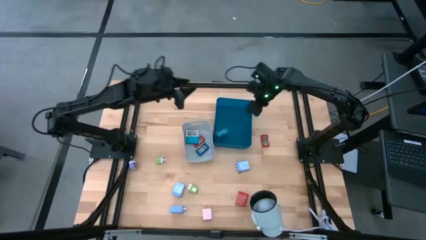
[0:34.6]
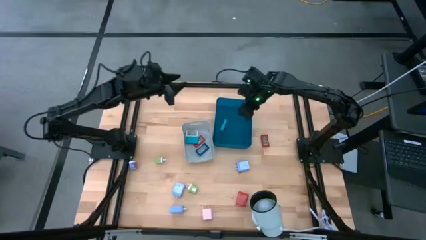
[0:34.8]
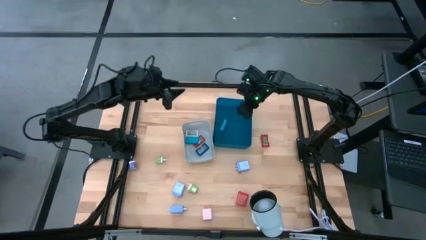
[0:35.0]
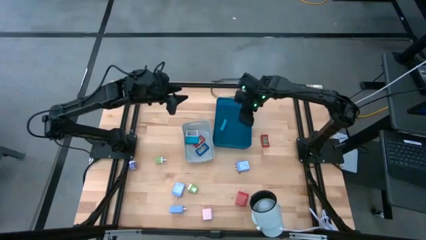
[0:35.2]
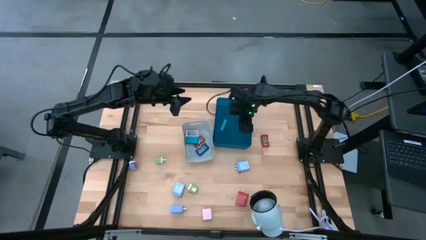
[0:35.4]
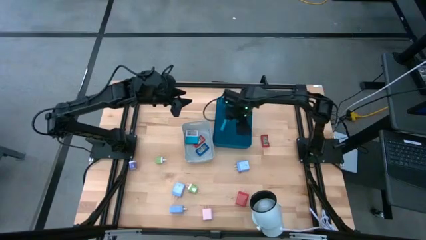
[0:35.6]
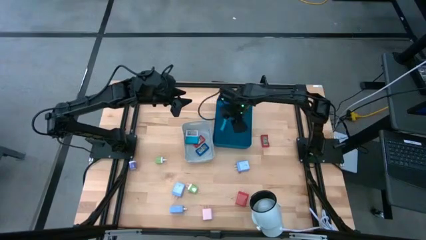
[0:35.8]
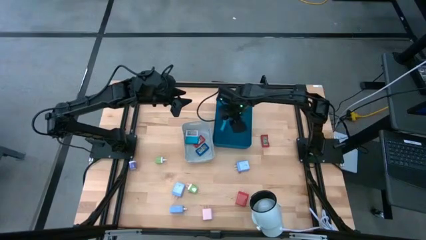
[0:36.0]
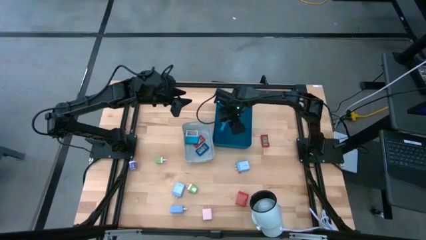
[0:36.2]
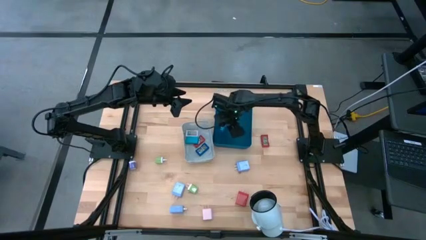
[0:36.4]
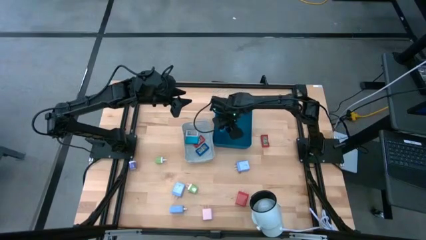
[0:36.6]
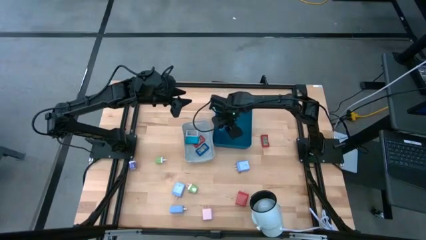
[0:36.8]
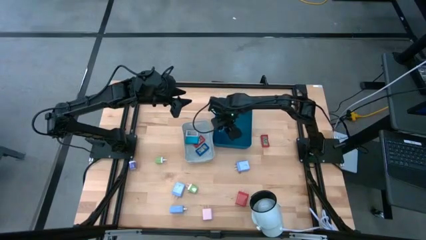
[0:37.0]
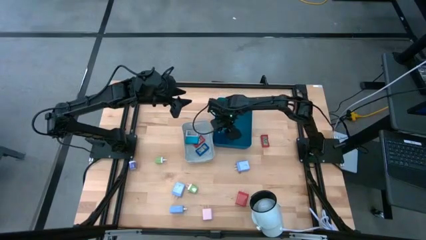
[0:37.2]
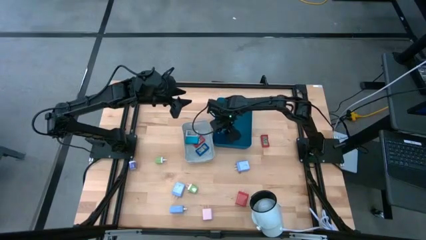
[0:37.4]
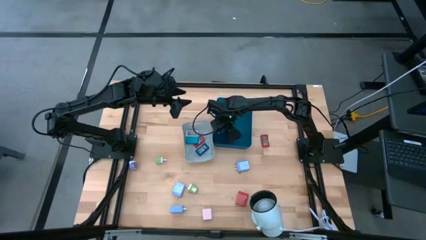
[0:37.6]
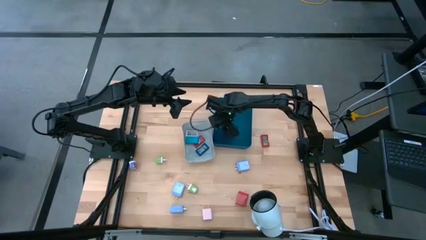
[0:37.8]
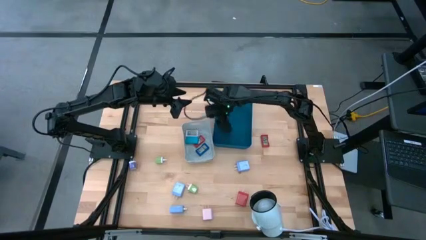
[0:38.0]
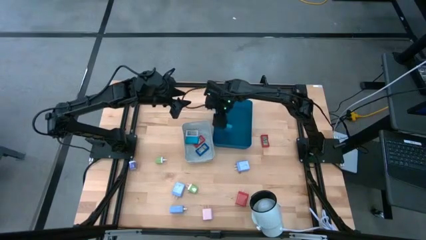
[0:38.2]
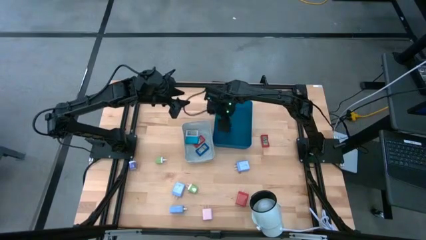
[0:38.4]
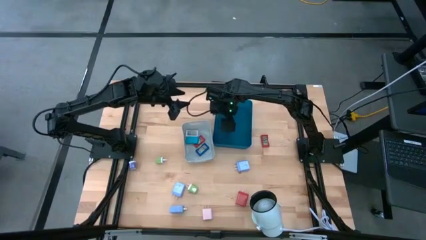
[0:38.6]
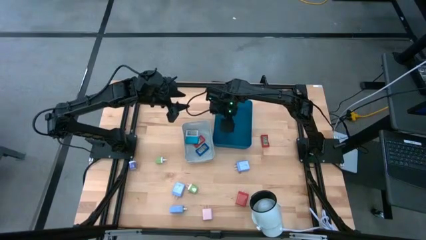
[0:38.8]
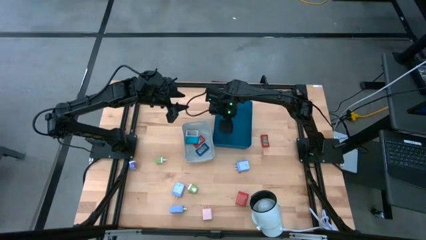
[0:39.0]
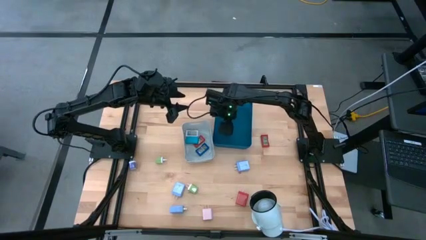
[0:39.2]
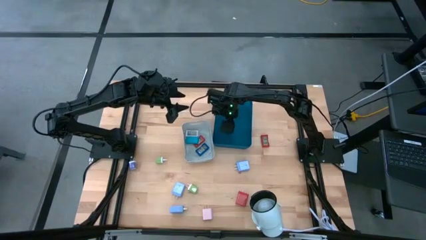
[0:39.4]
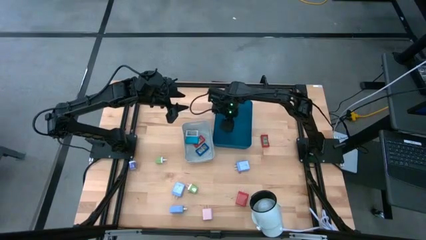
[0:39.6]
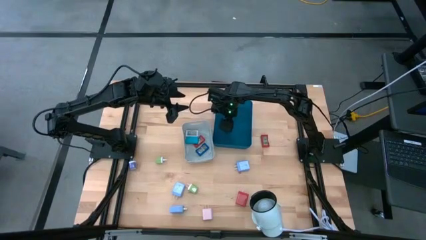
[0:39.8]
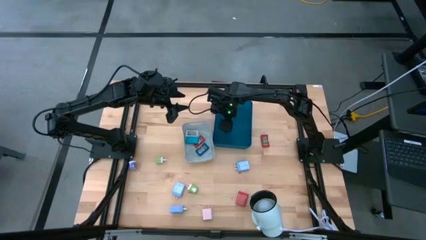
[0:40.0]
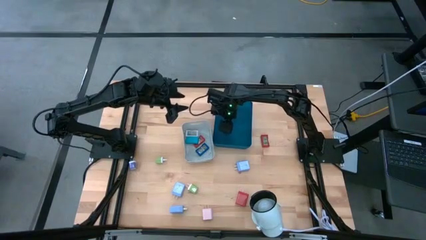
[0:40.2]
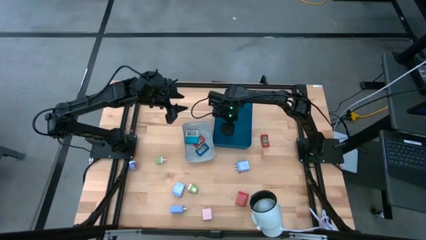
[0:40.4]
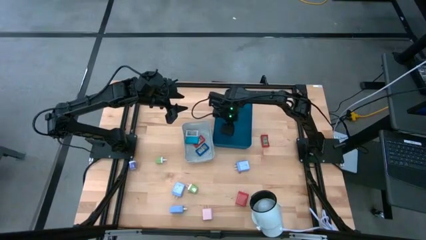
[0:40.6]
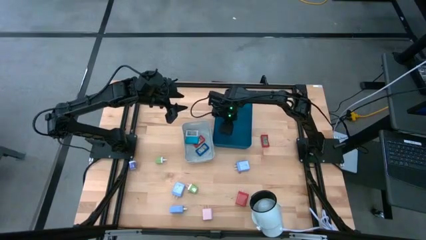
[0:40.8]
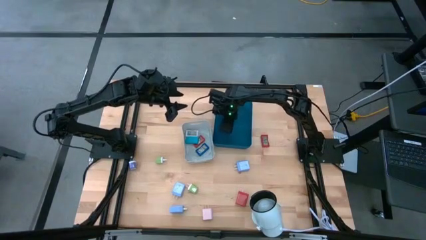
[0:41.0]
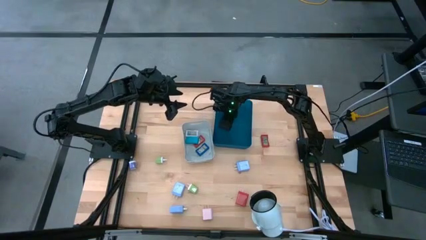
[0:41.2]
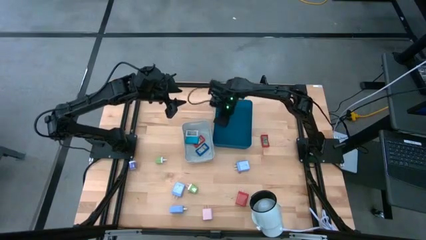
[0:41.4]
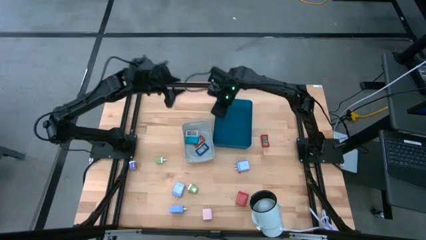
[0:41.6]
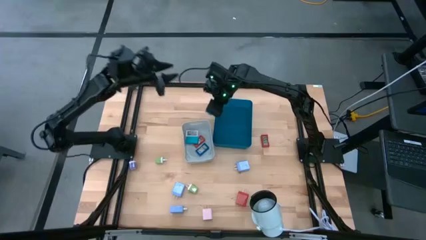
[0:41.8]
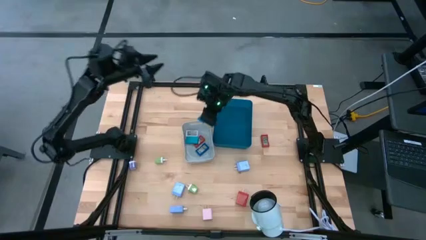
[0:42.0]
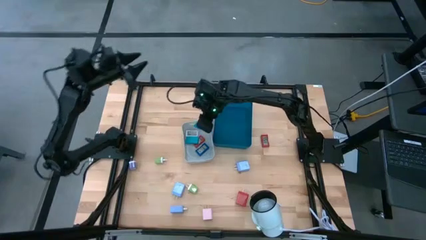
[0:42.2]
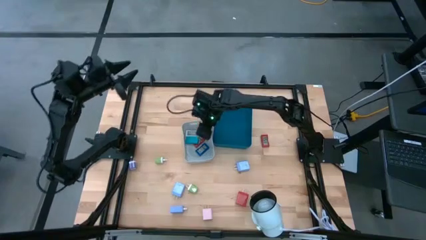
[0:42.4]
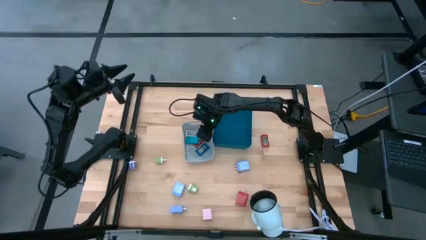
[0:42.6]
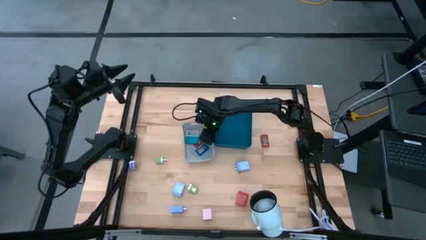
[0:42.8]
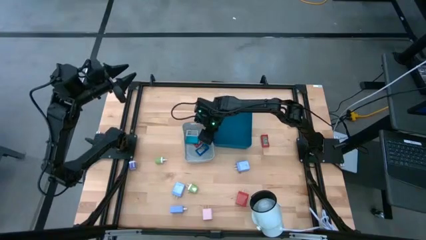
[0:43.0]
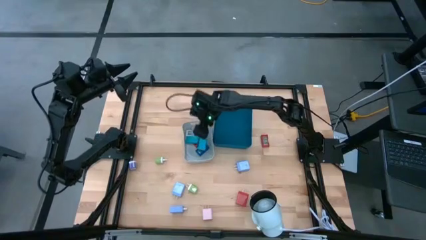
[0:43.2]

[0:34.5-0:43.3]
Task: Pick & Place Office items
Put the light blue timer into the gray bin

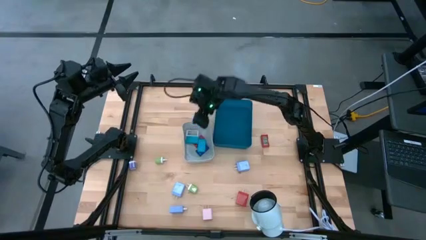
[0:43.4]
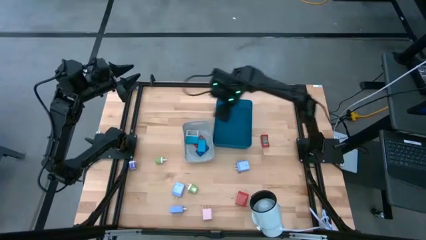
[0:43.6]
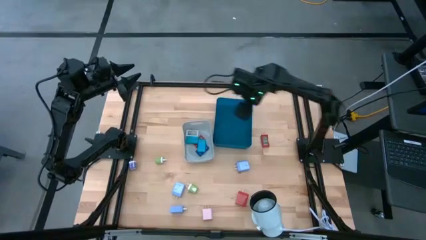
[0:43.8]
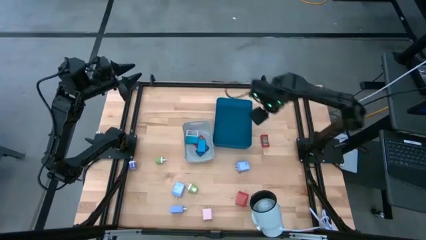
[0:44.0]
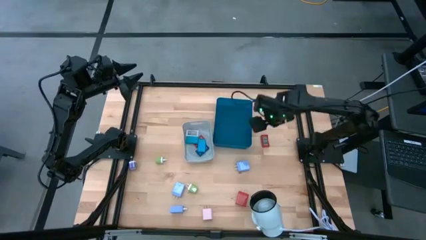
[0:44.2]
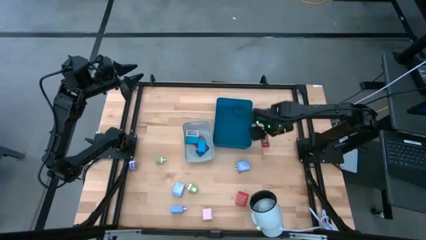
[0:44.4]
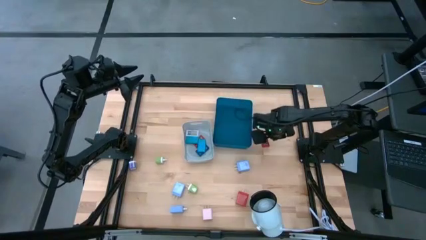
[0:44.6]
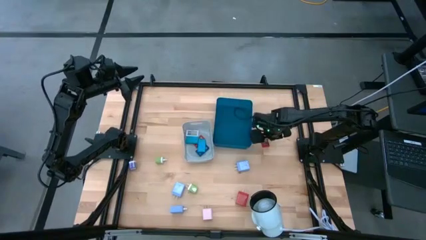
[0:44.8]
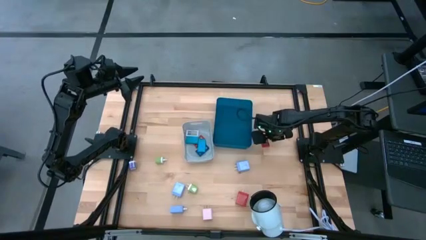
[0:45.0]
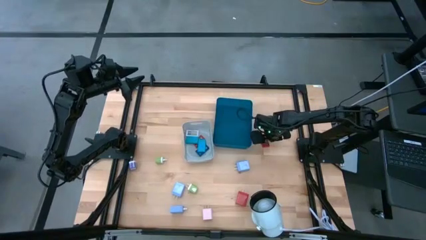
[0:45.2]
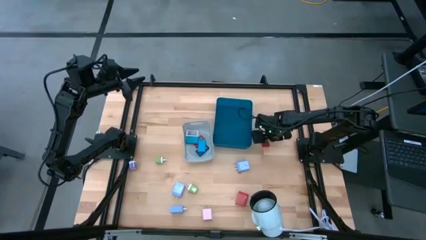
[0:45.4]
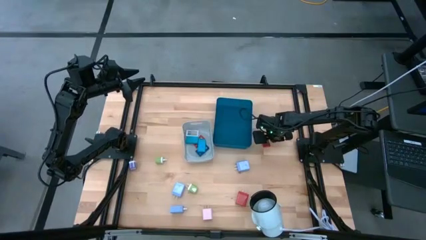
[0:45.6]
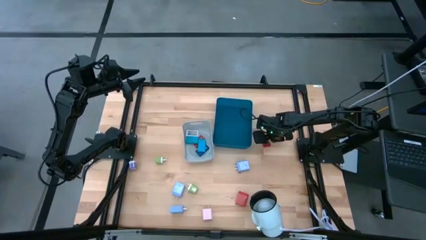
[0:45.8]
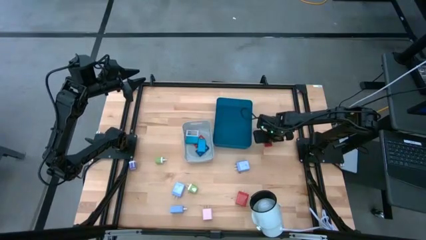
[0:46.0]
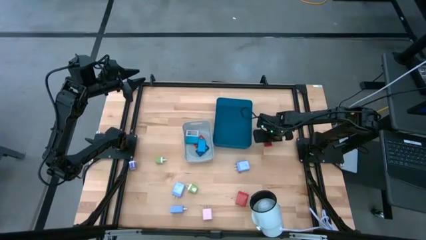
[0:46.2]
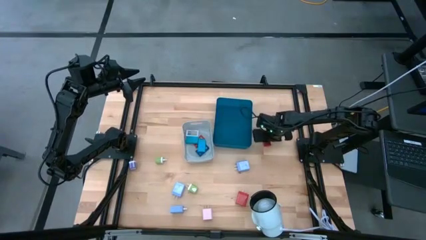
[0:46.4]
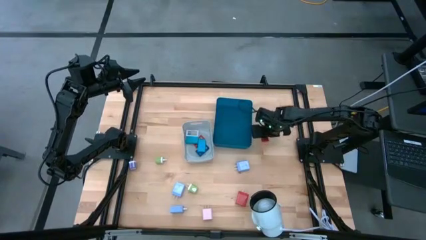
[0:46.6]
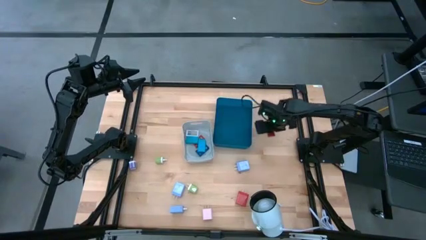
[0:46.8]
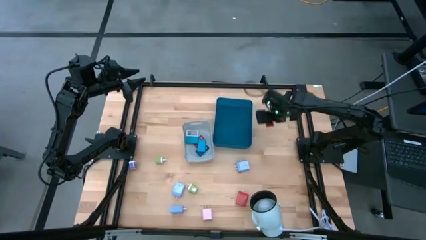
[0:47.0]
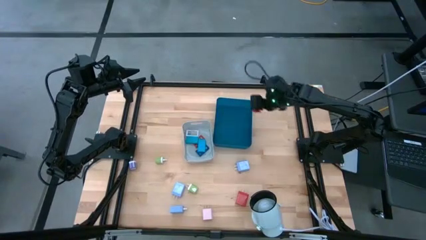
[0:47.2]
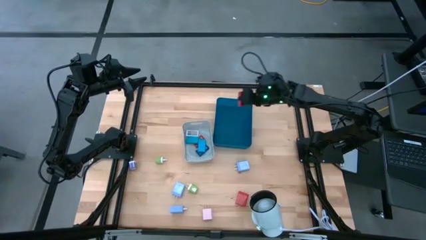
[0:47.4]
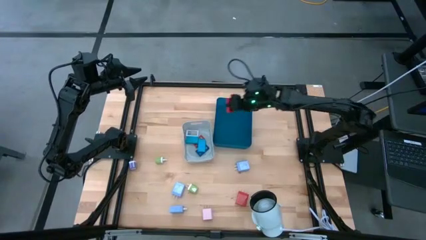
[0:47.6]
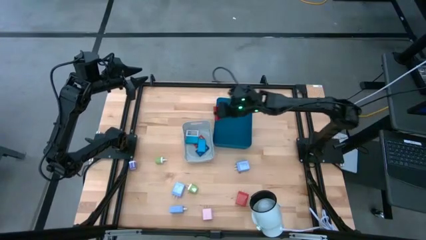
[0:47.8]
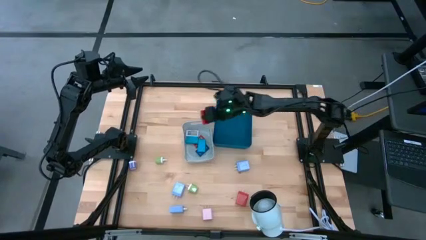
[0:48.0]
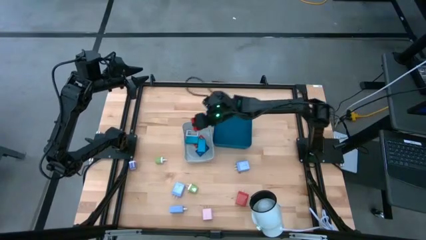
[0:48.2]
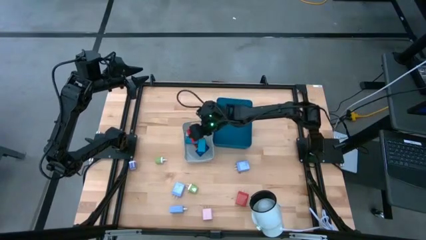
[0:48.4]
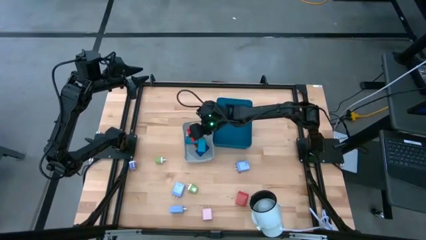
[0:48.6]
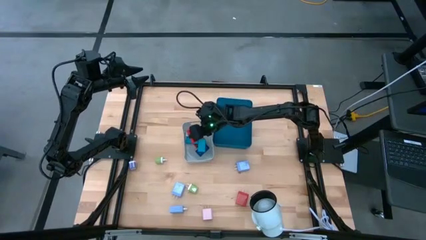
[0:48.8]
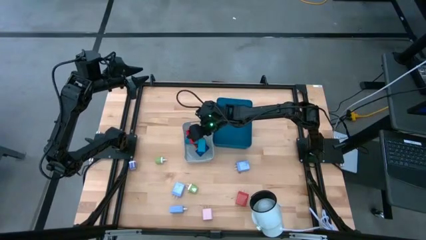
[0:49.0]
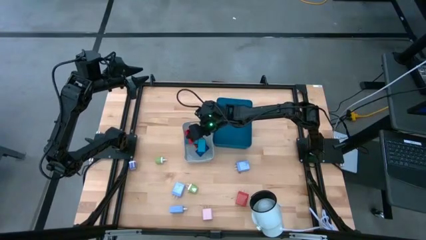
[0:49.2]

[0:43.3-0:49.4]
Put the red timer into the gray bin

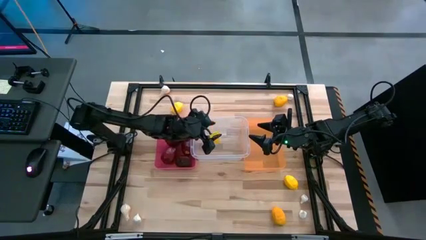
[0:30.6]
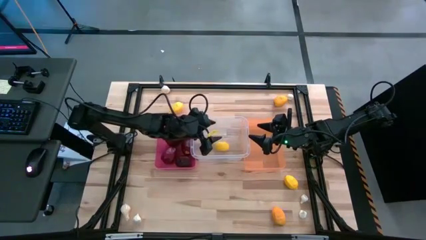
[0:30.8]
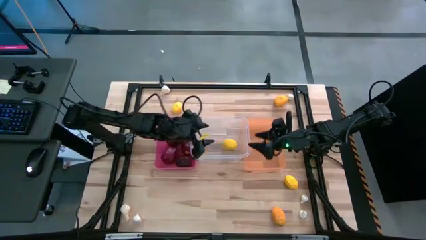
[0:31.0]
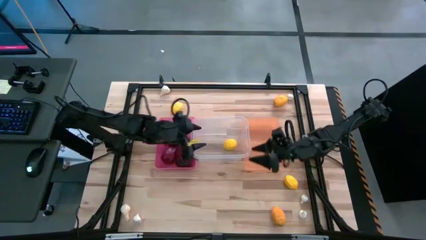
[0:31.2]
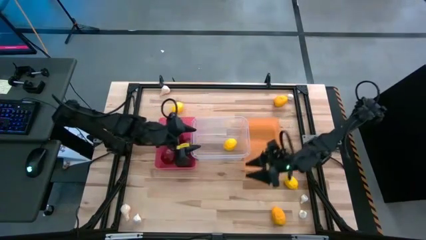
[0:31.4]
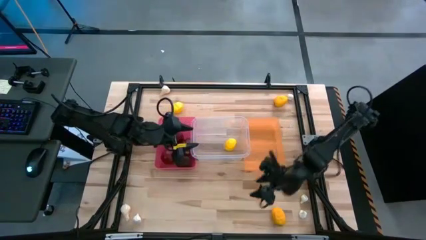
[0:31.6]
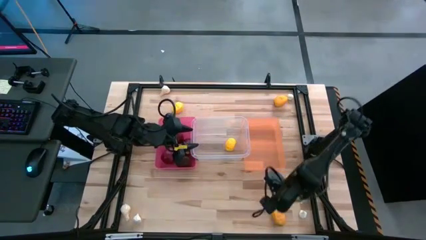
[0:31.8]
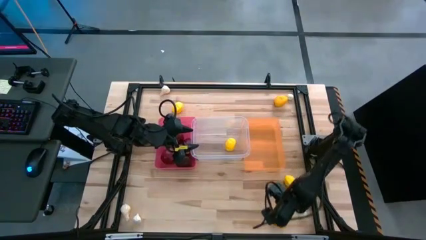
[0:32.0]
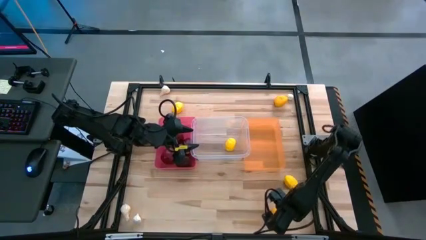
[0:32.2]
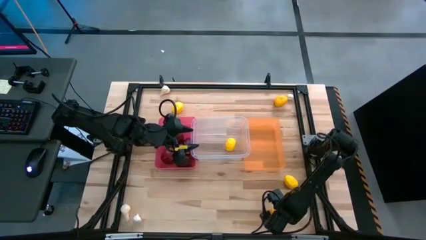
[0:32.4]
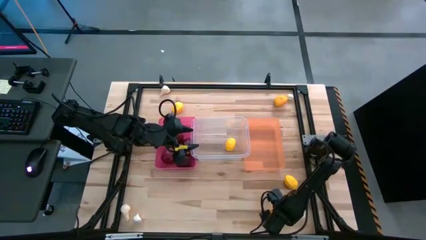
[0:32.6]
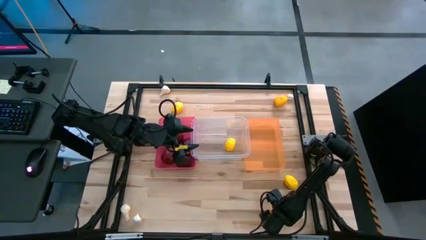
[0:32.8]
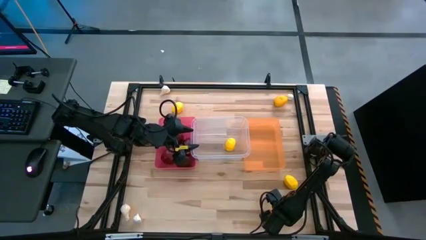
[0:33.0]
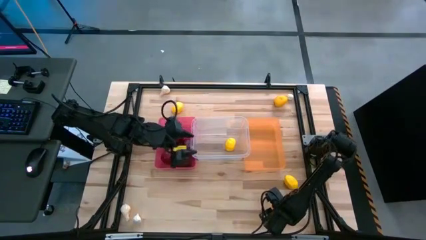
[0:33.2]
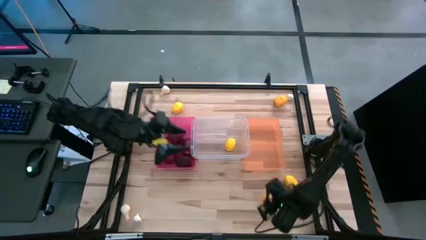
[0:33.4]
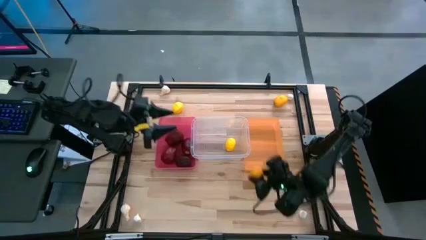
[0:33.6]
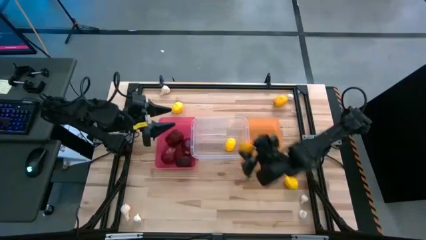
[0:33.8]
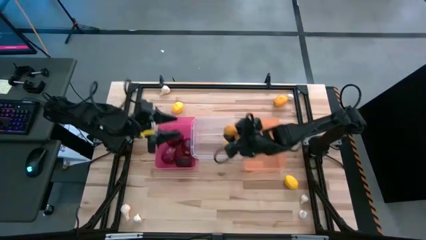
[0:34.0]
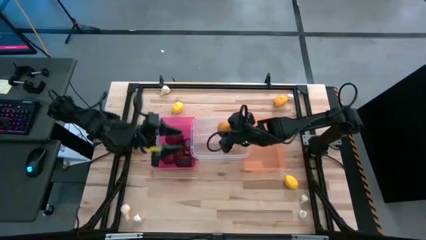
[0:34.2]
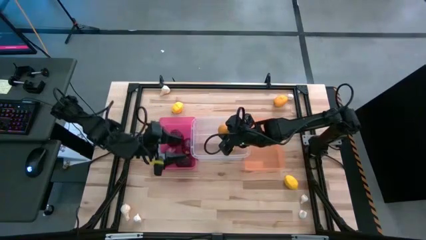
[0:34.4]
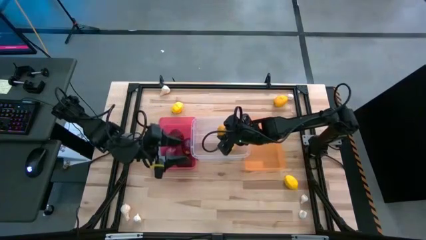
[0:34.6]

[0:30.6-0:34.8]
Task: Sort produce into baskets
Put the yellow lemon into the transparent bin
